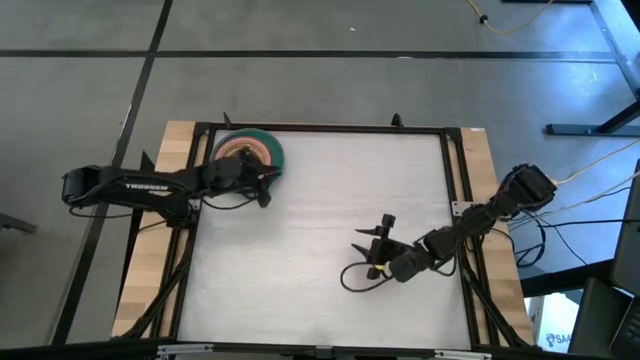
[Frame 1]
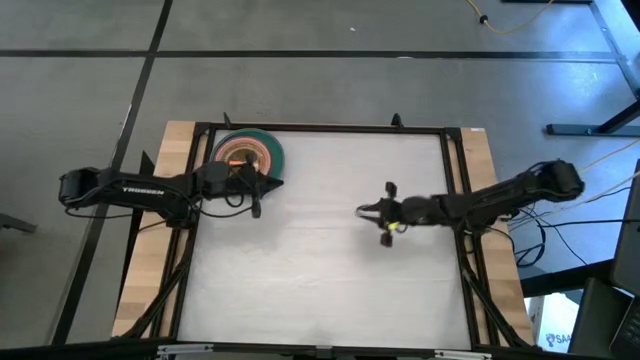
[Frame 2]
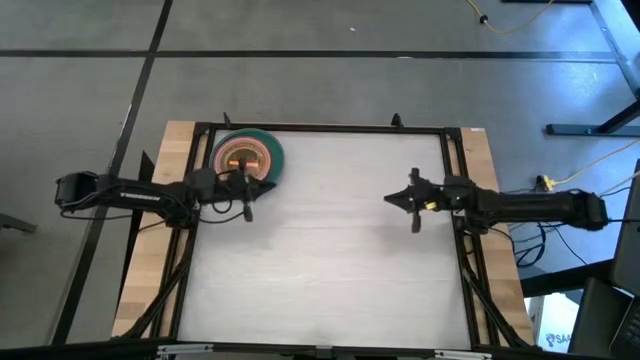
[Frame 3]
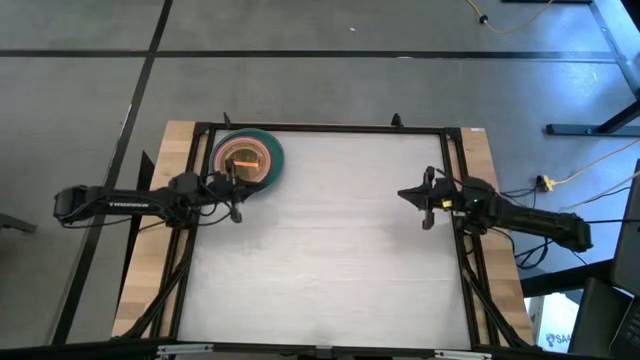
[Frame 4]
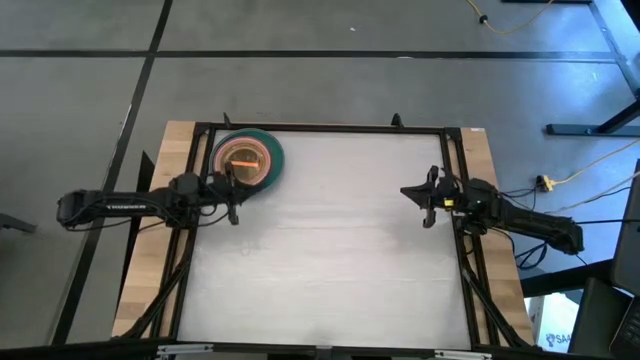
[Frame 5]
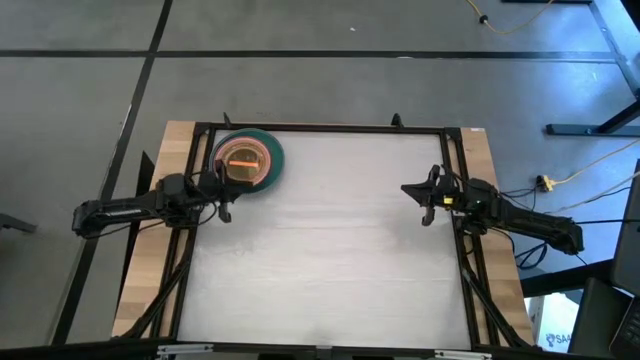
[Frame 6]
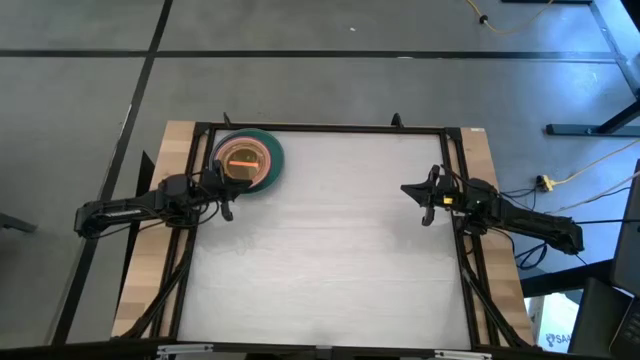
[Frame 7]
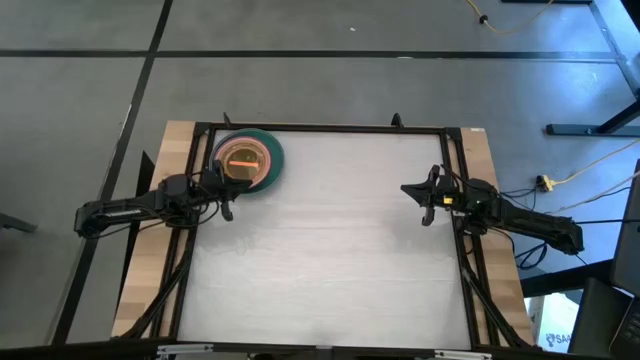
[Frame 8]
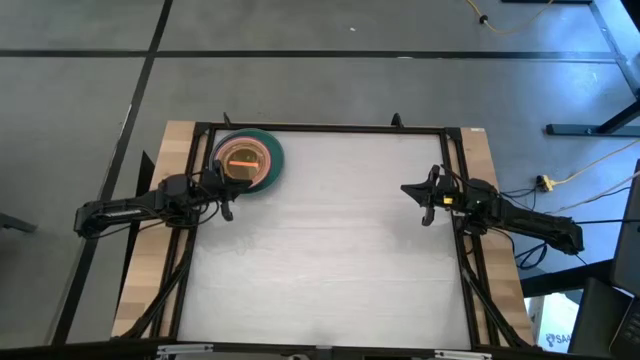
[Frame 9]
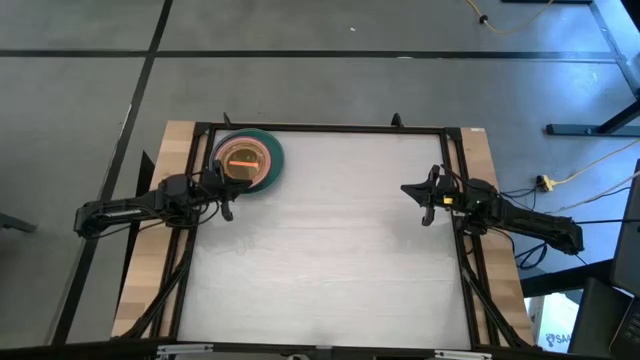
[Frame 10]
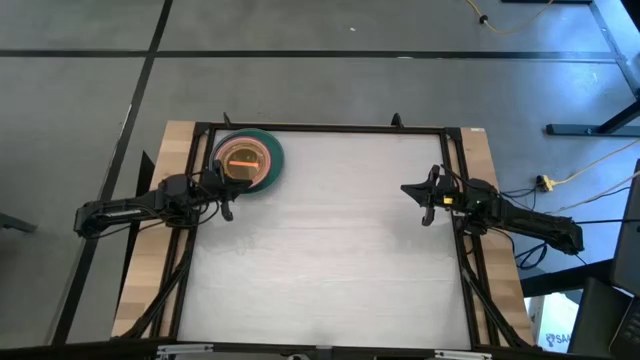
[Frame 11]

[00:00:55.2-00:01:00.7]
Task: Stack plastic plates
Return to Home Position

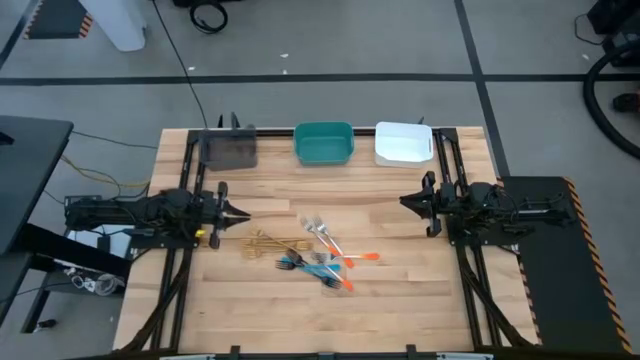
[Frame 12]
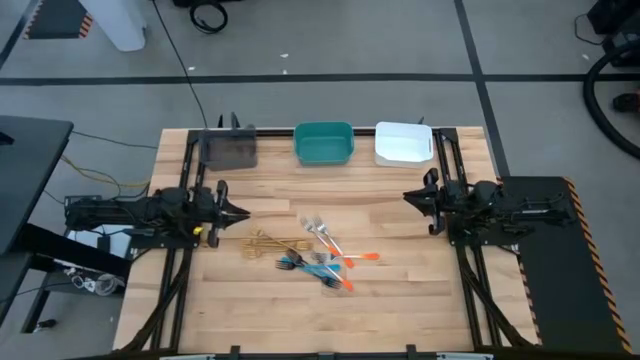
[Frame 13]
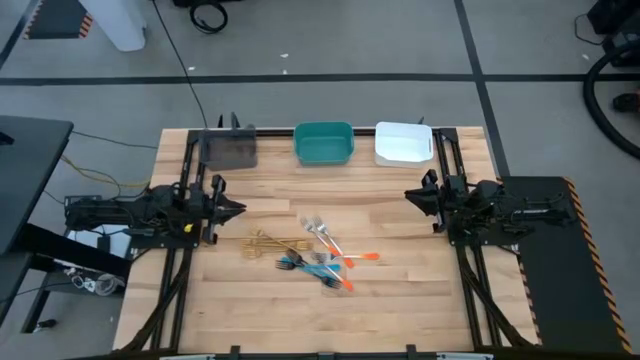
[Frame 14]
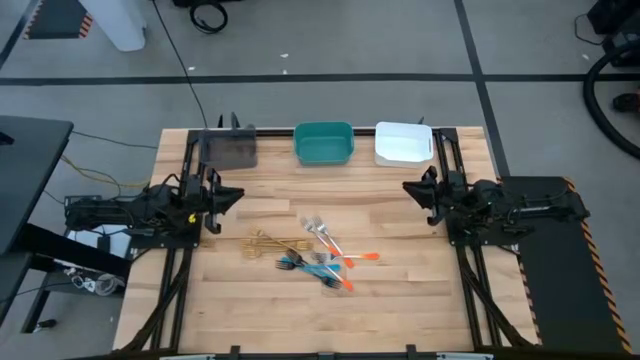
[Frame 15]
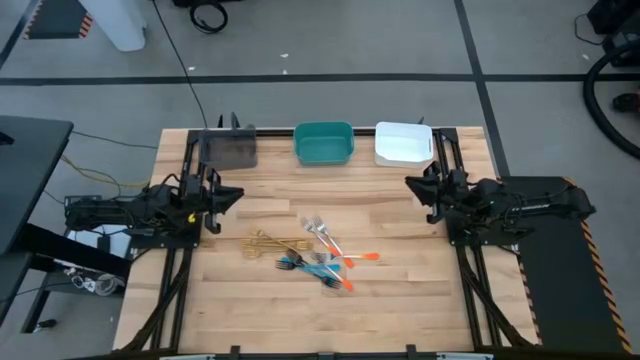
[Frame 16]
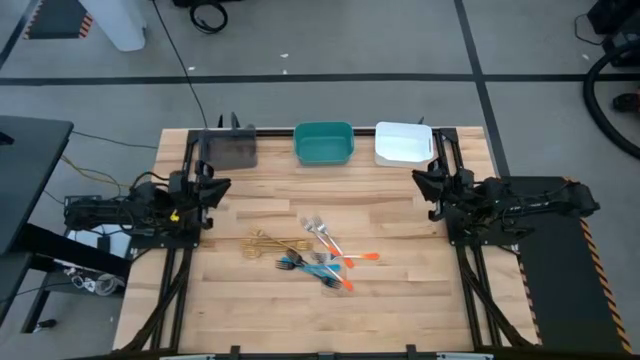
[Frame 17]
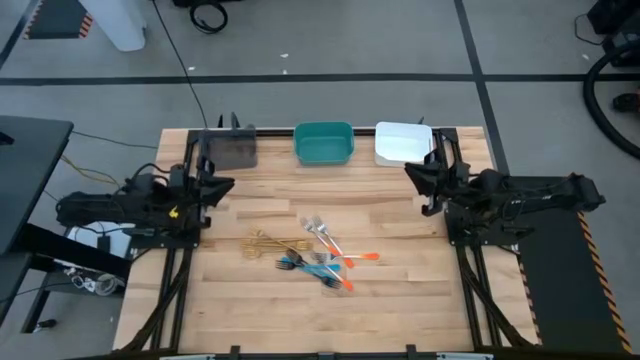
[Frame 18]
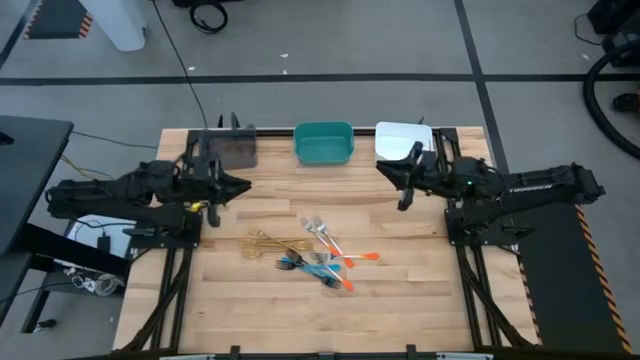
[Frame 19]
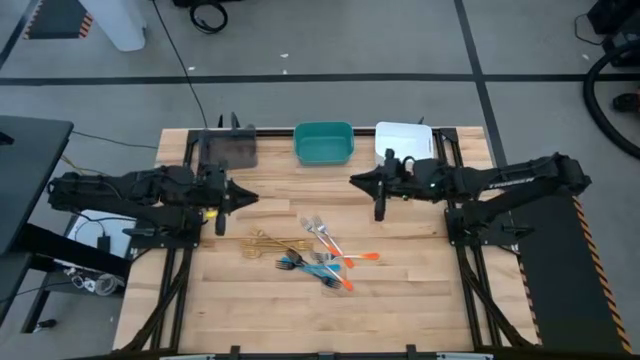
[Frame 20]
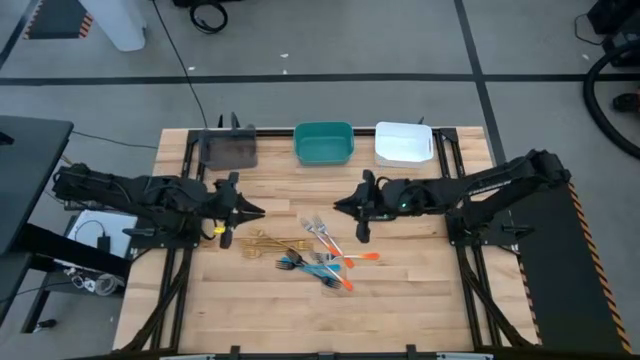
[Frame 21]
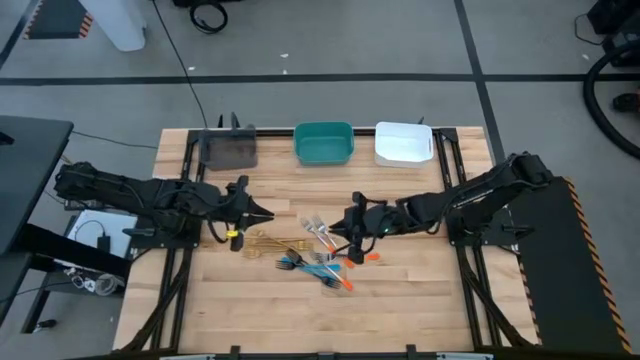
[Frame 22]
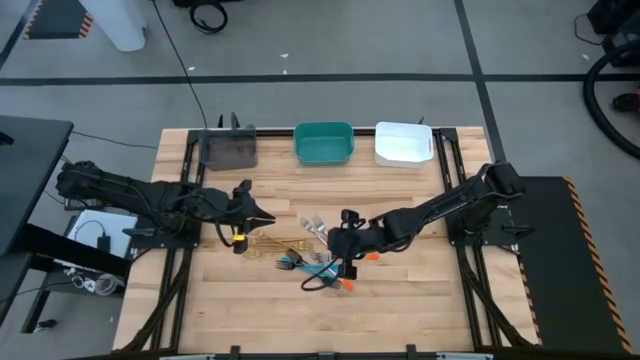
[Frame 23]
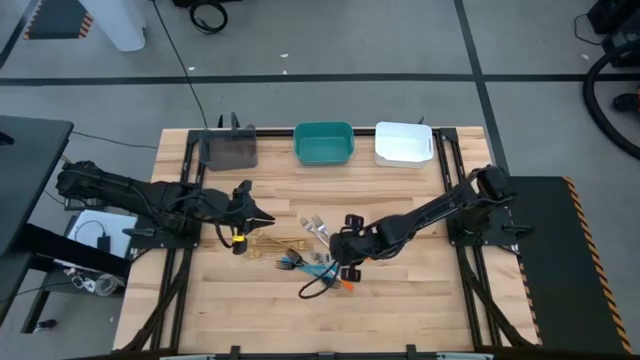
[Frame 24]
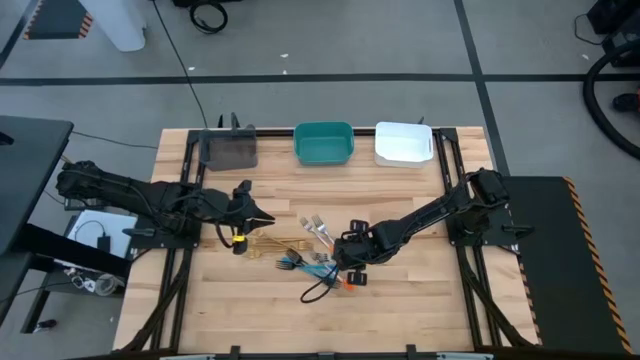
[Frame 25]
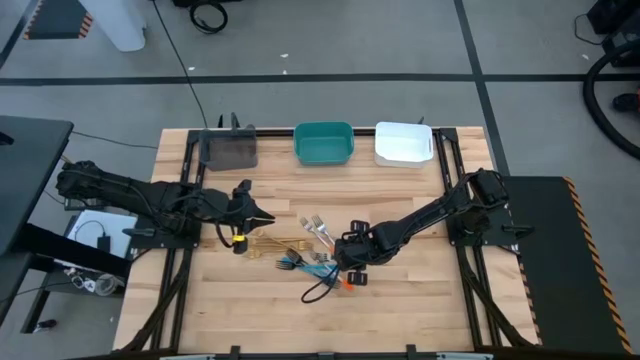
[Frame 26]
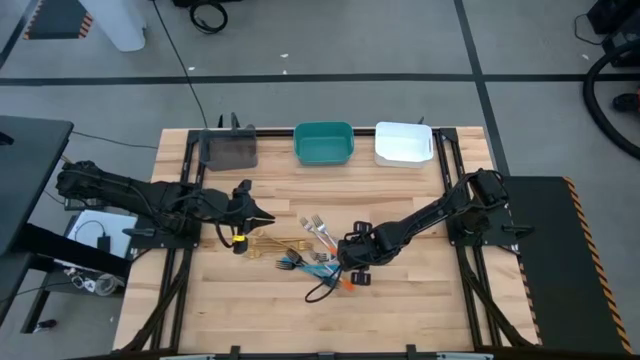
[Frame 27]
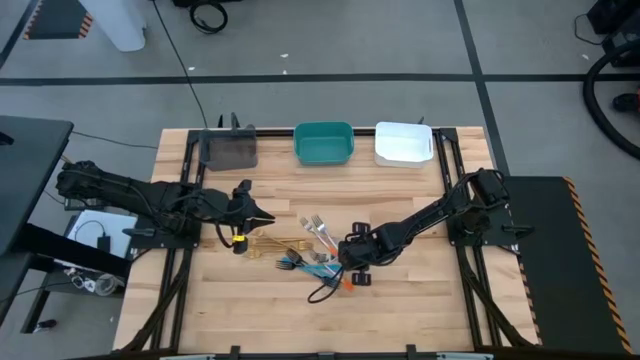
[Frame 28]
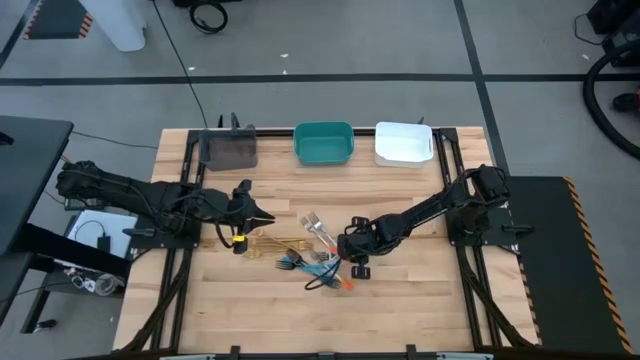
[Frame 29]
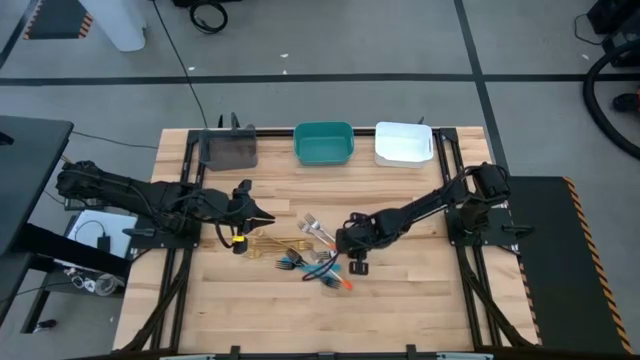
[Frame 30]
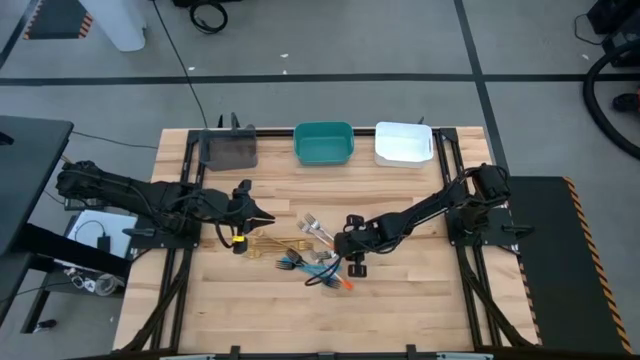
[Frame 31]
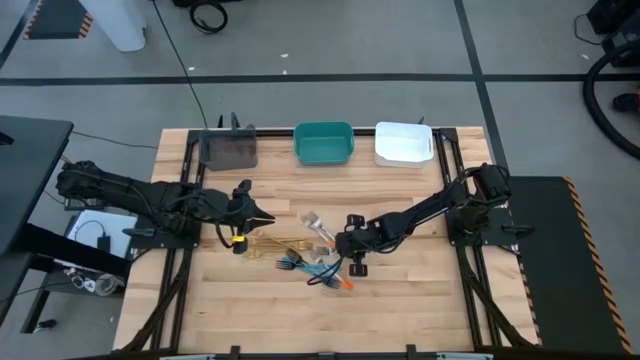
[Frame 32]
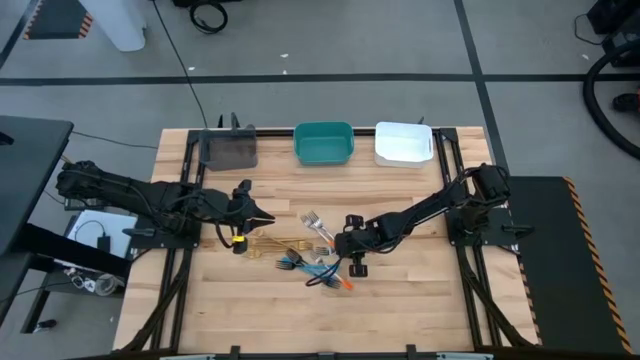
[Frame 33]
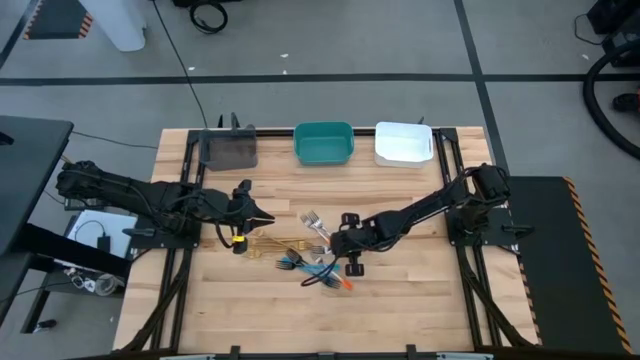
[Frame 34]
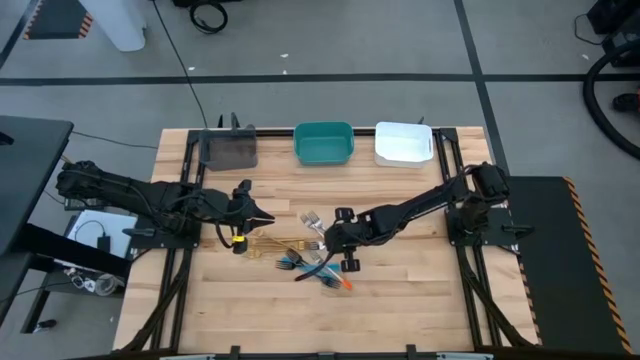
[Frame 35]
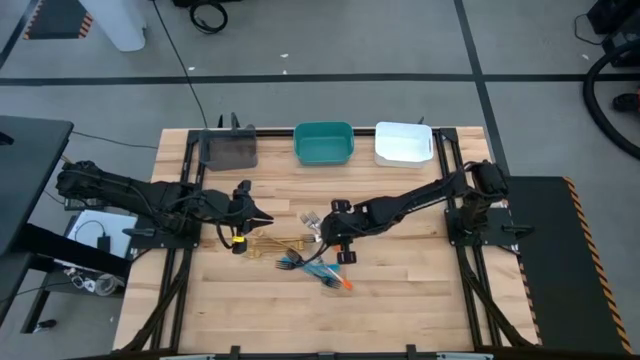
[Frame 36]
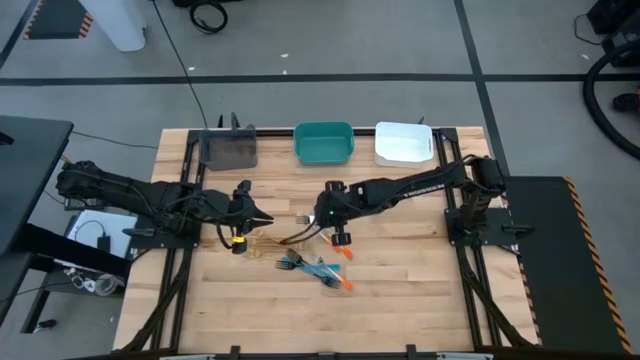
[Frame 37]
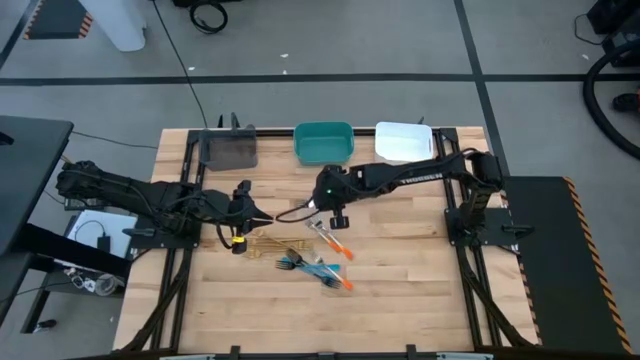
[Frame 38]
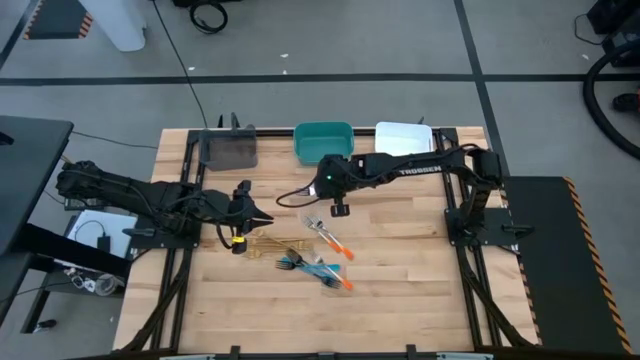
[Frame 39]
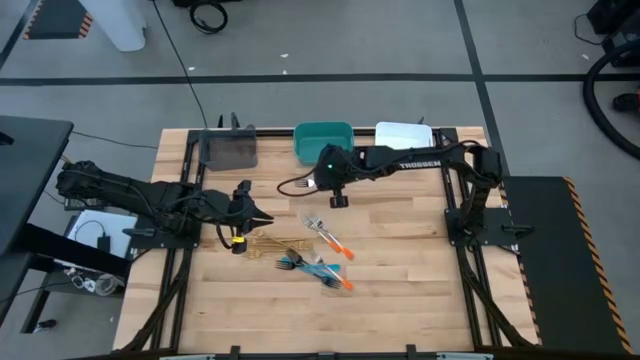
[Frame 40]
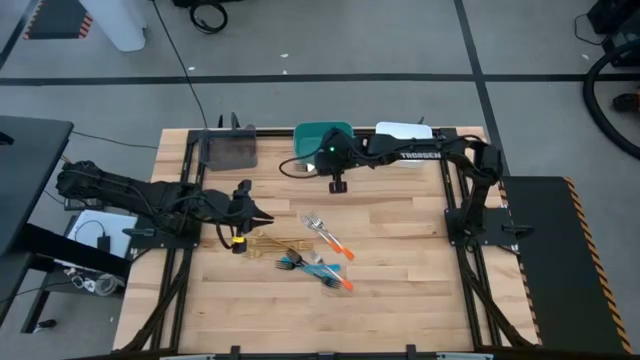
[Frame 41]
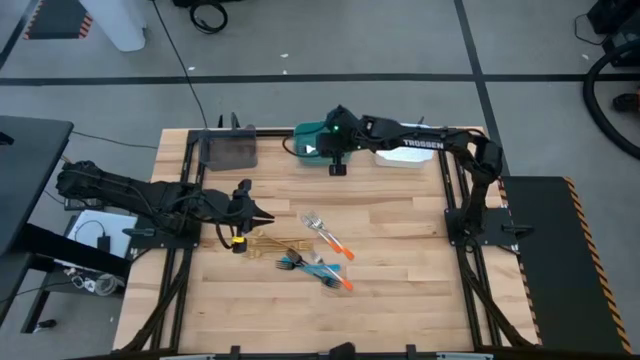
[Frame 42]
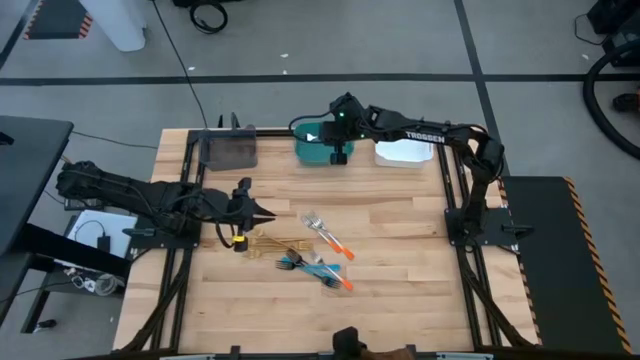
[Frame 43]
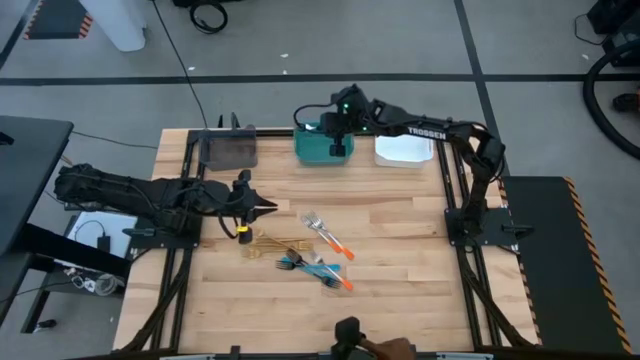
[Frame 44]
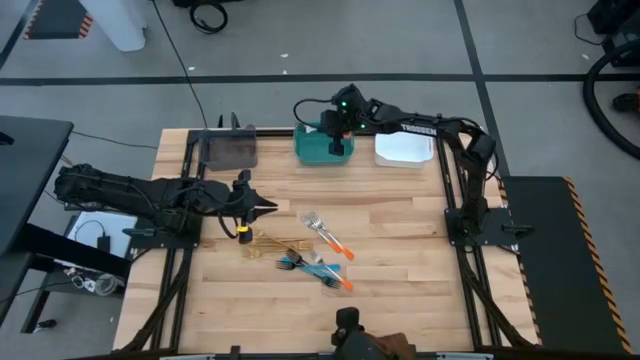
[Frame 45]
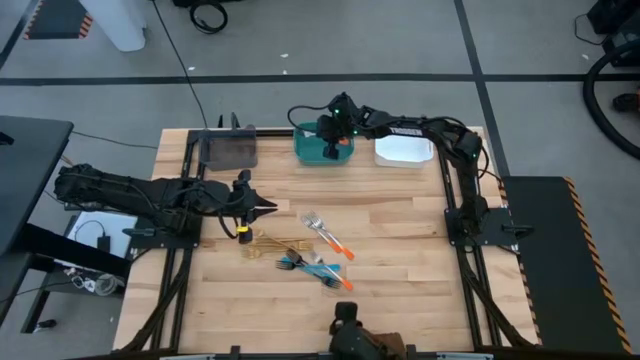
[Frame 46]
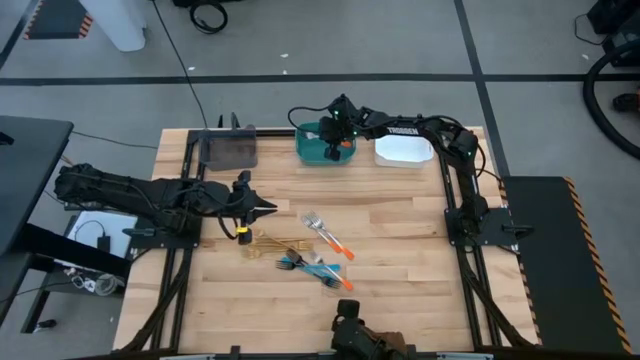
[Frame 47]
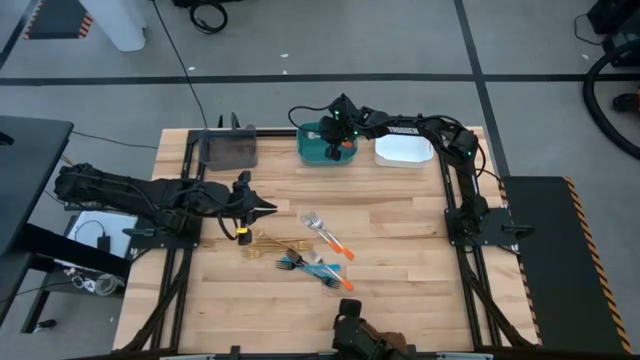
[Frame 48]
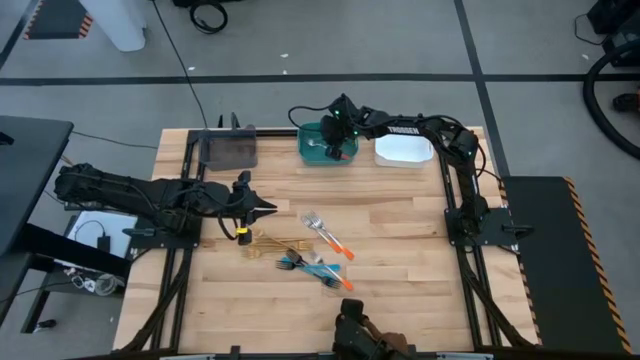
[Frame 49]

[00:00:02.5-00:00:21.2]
Task: Sort silverware by color (type)
Put the orange fork into the blue bin
